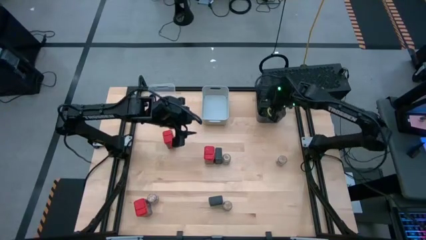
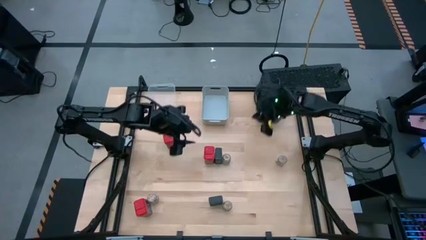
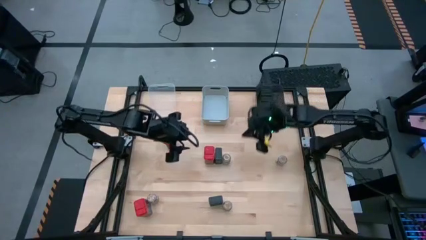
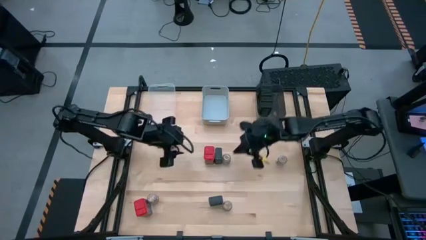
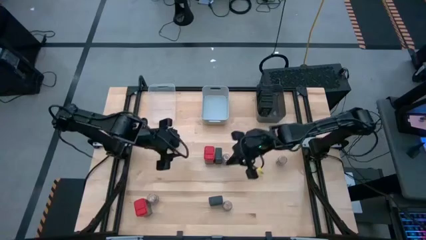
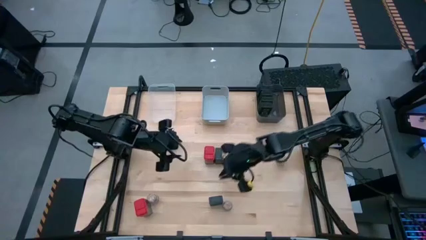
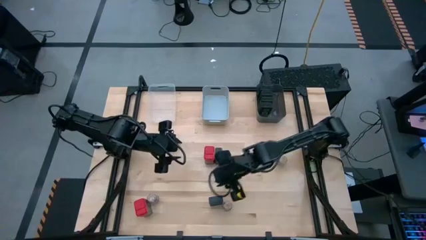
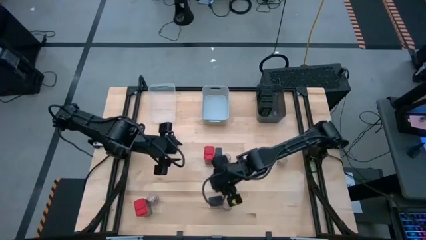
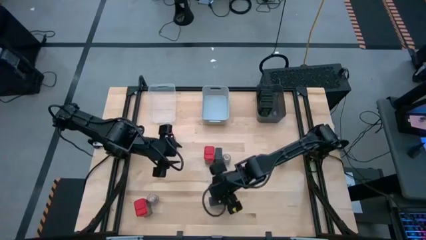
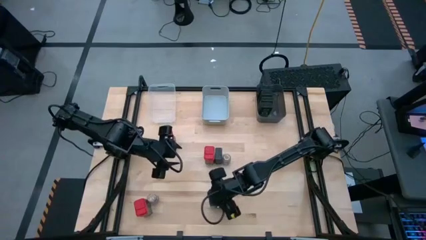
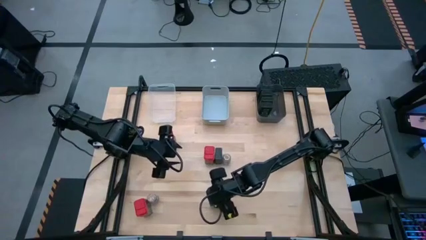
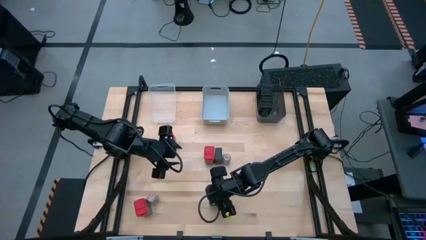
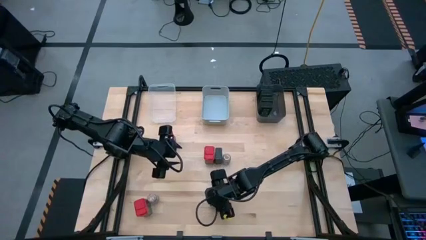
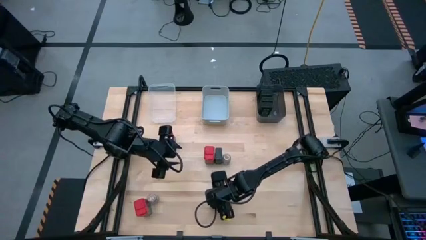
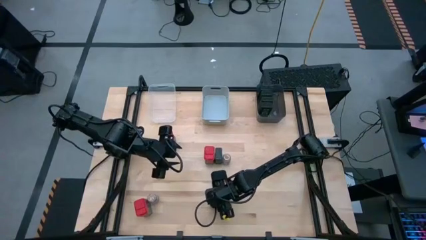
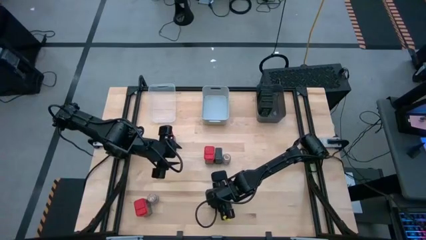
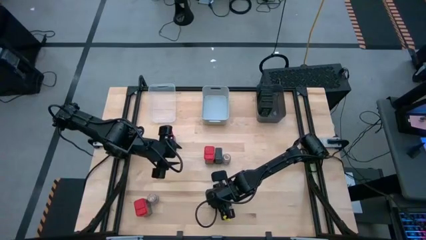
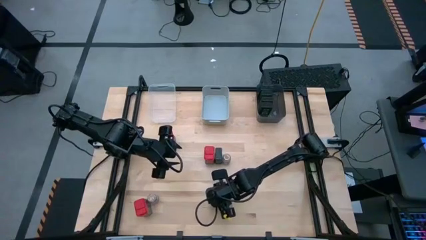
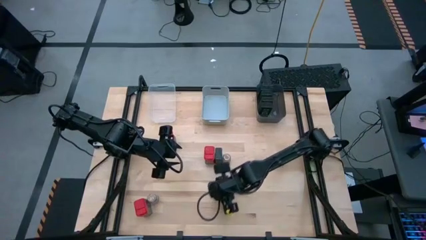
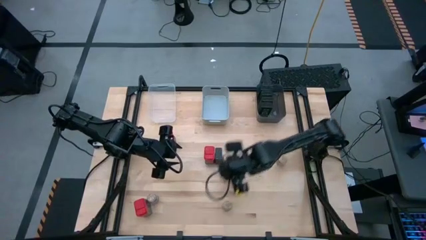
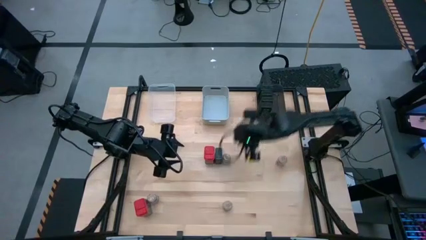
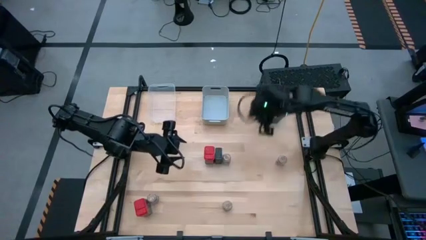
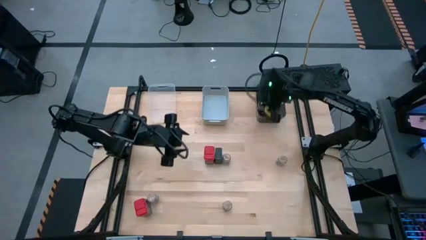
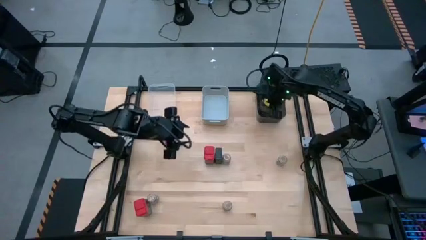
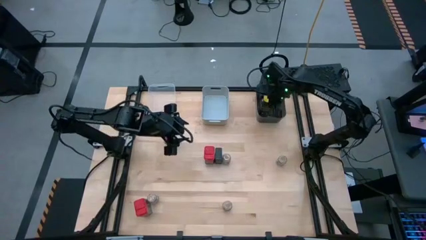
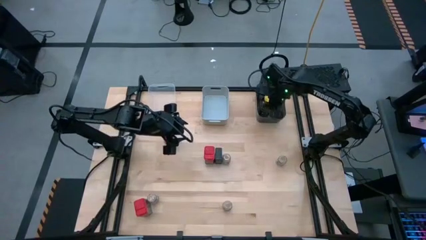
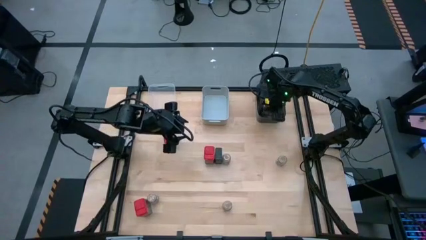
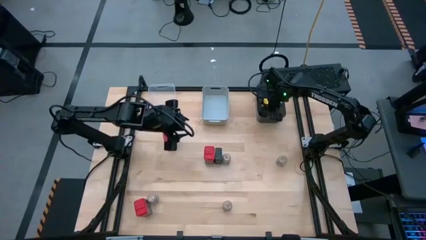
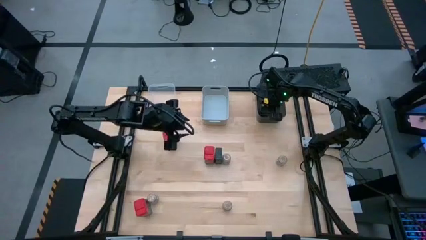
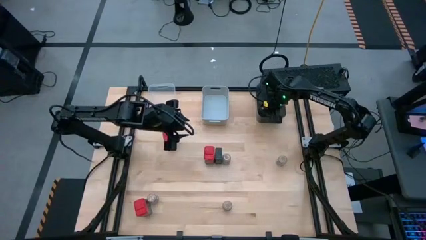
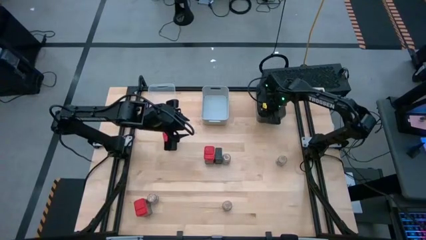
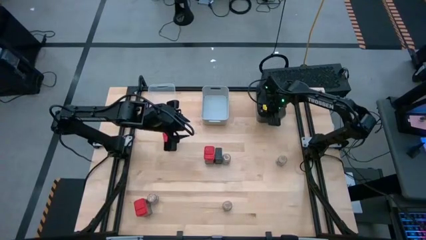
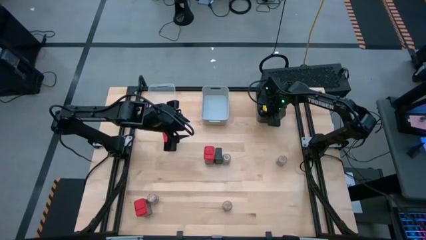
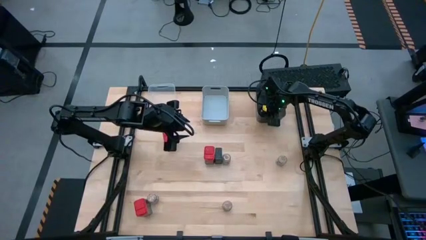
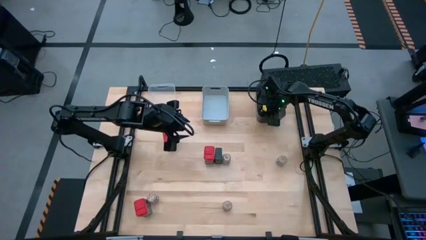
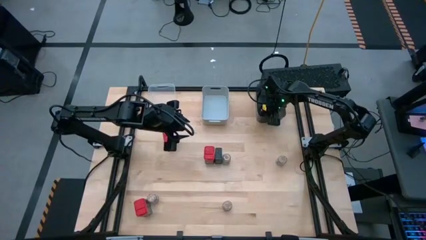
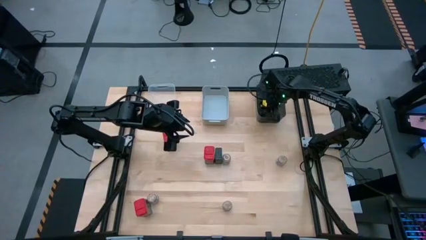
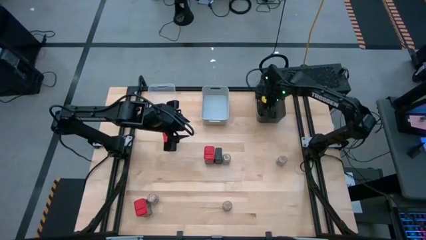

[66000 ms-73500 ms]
Task: Sort spices by type
Put the green seasoning can into the black bin

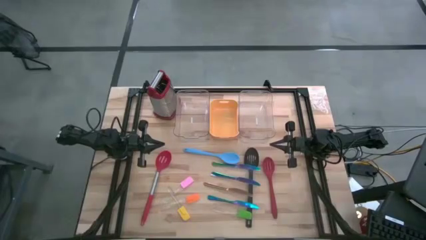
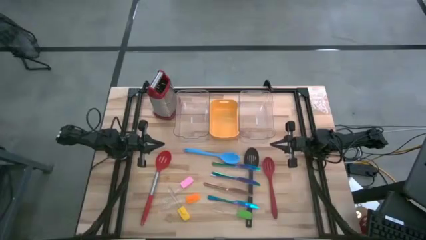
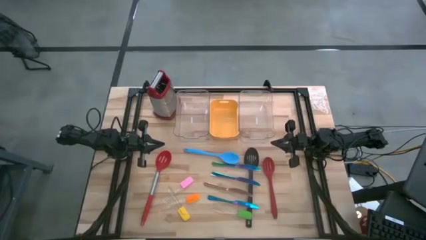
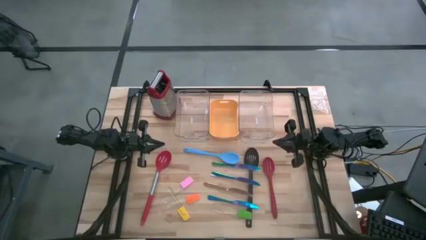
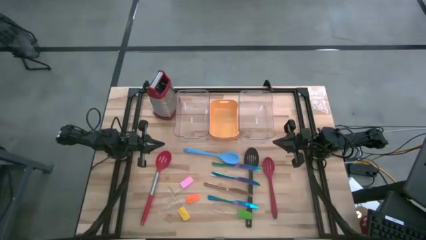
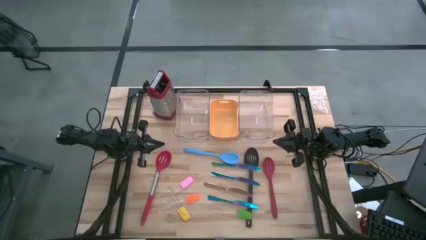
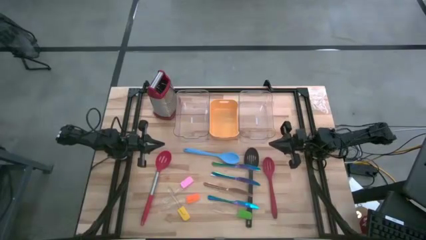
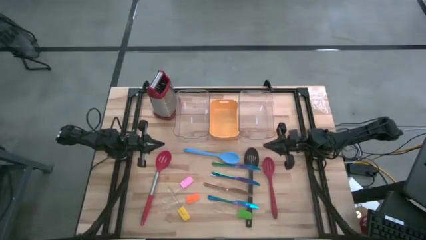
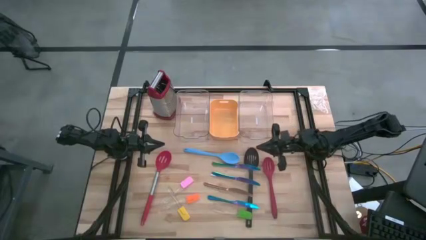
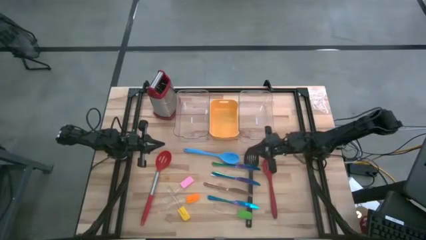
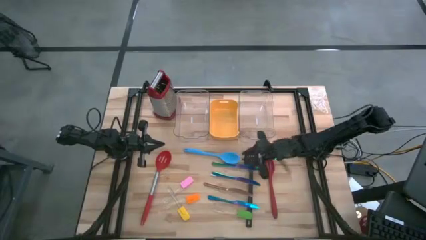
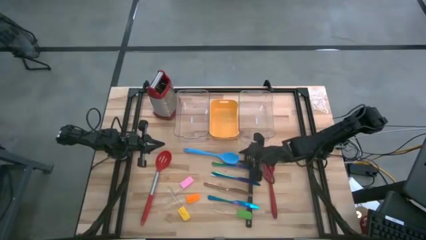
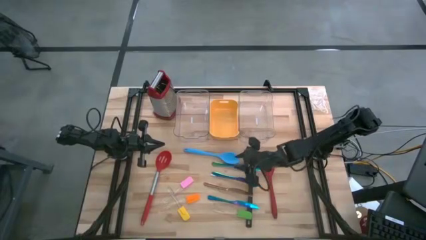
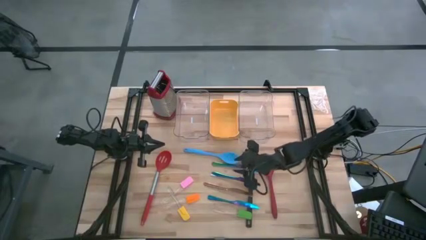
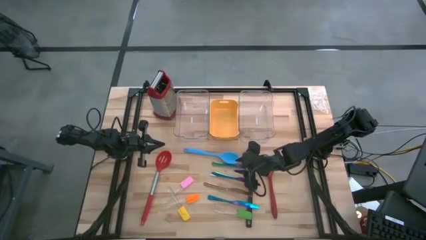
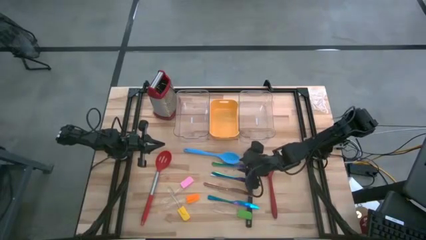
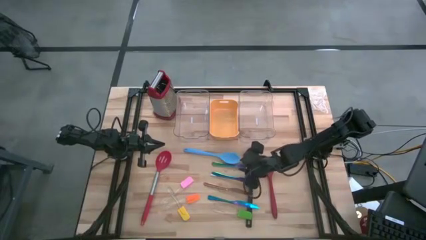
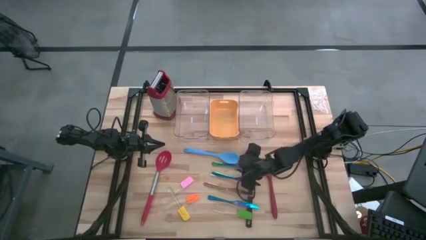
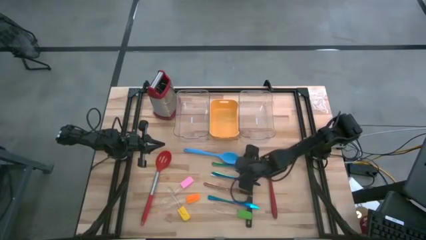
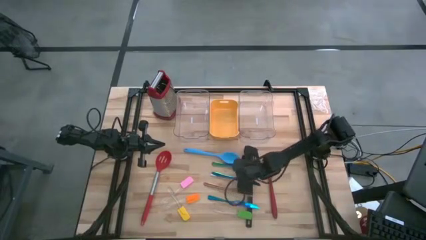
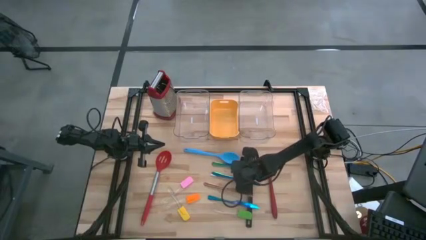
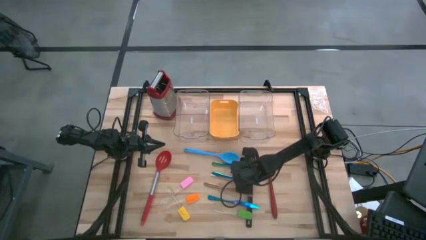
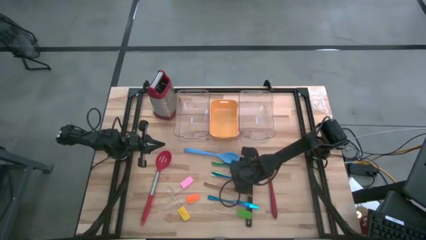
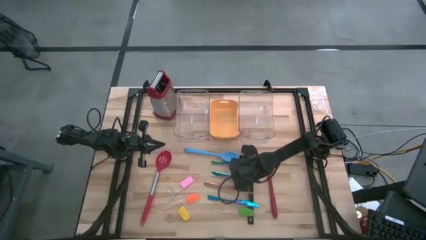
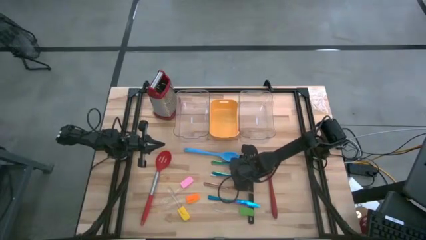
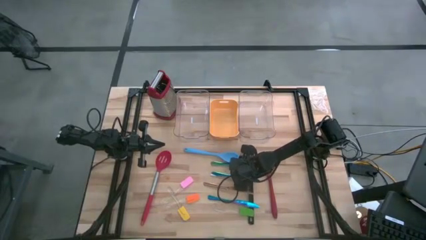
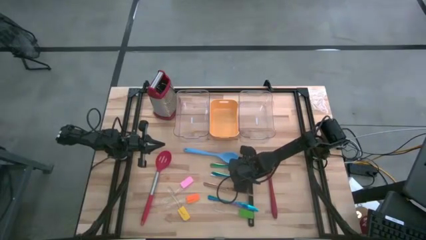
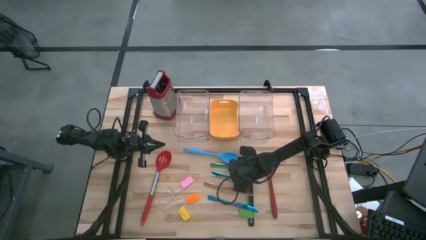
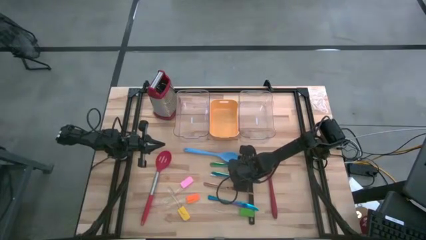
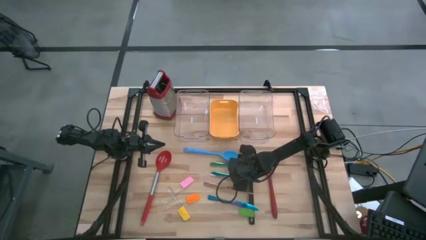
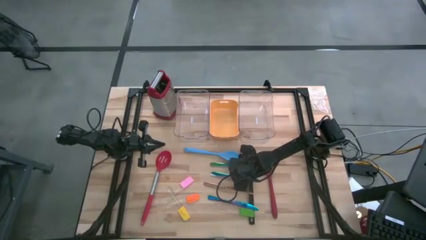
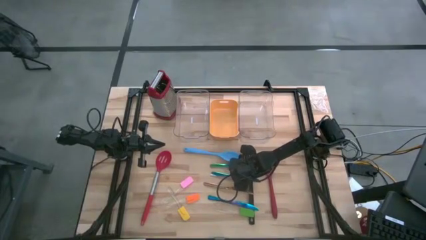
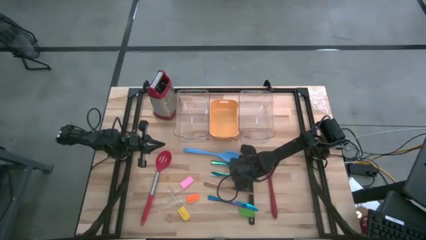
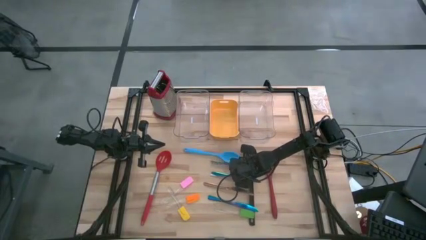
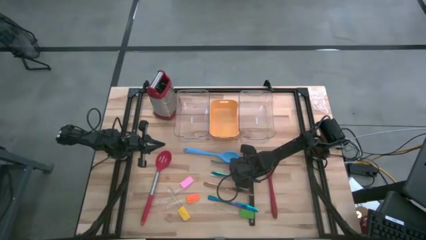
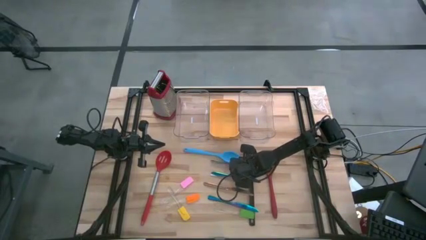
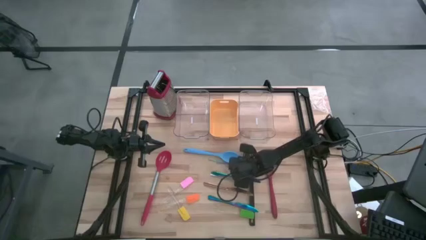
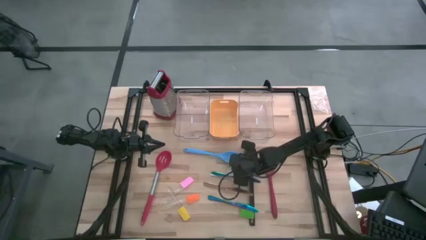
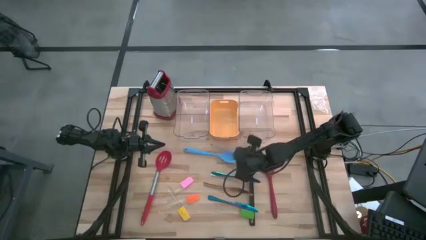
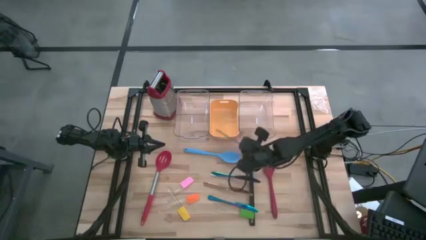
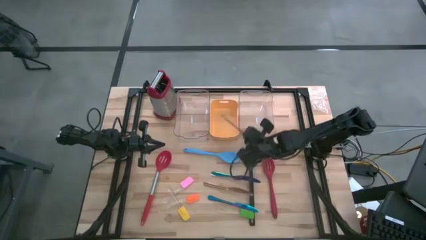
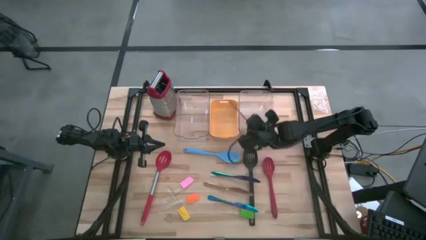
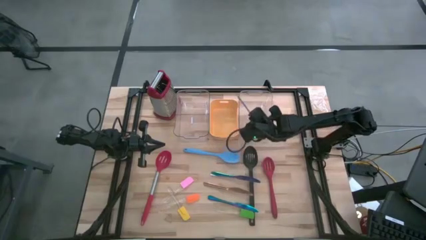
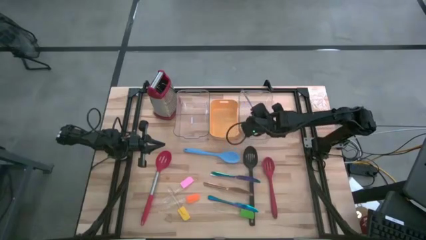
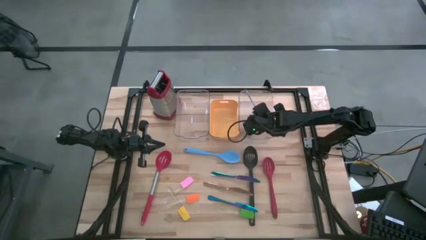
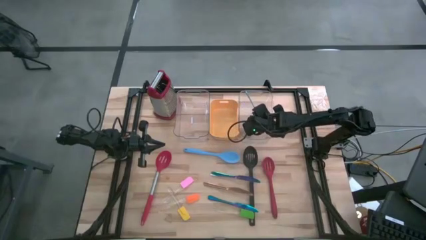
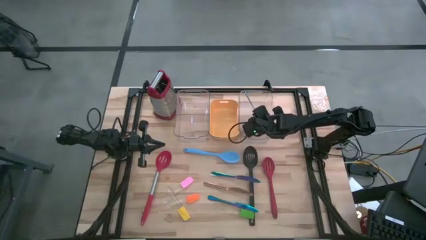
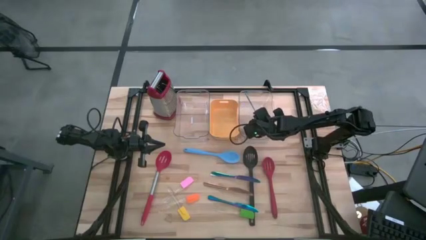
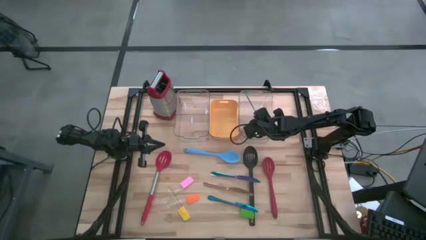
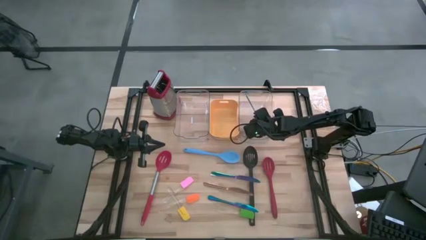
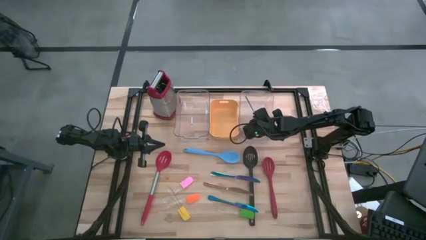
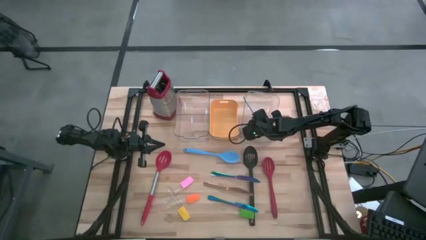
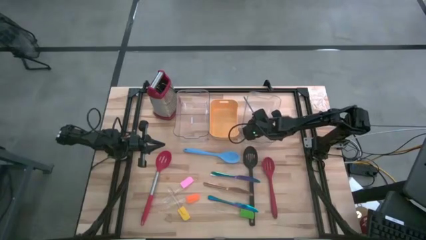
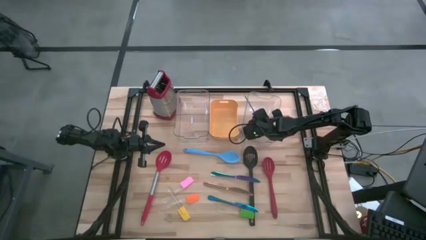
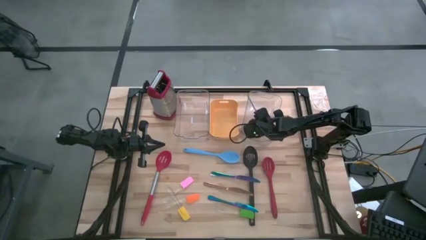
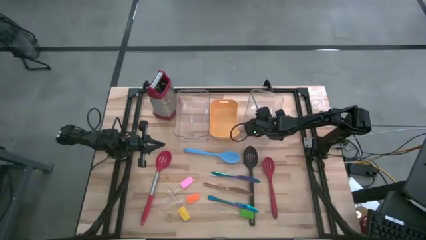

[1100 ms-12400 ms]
Task: Pick & Place Kitchen Items
Put the top blue knife into the right transparent bin
